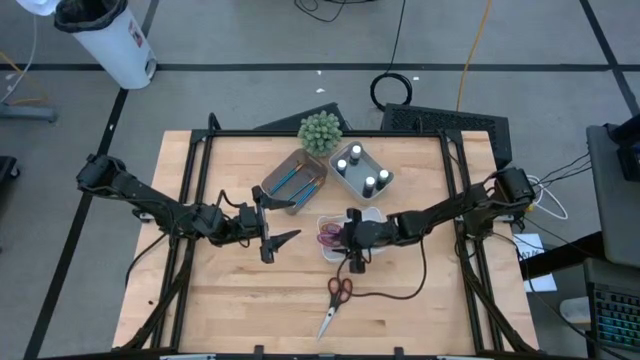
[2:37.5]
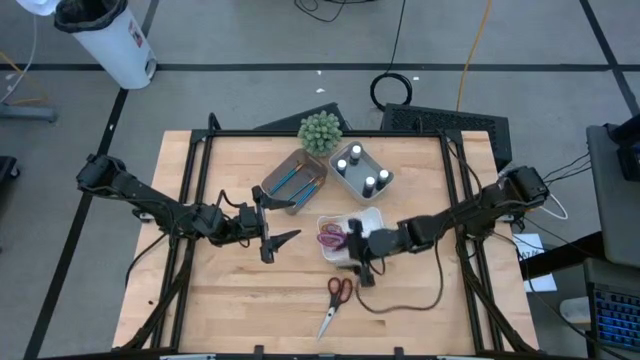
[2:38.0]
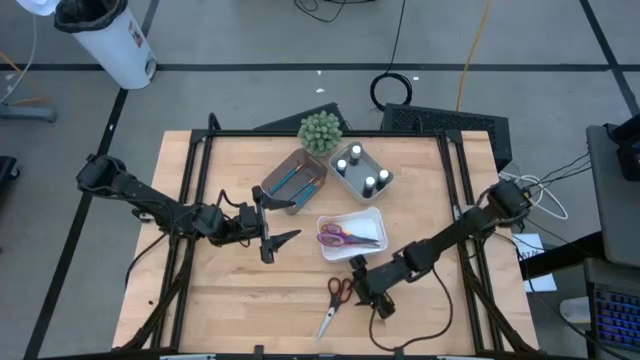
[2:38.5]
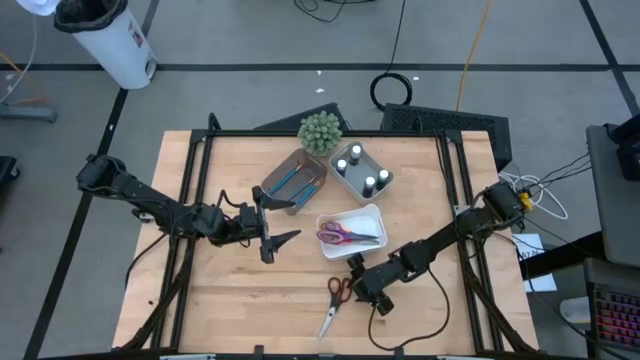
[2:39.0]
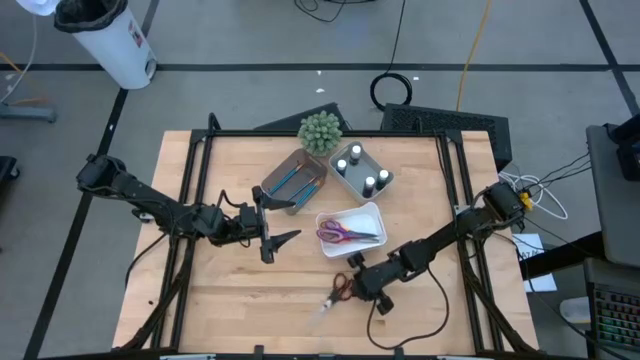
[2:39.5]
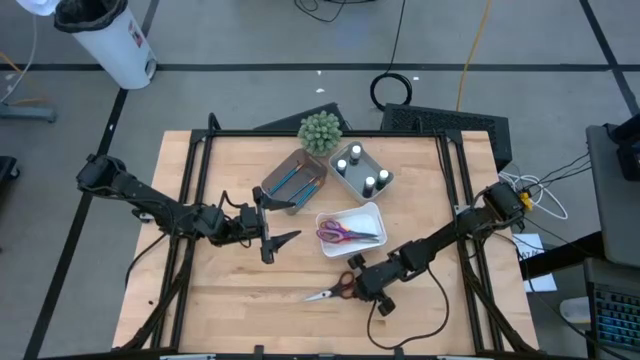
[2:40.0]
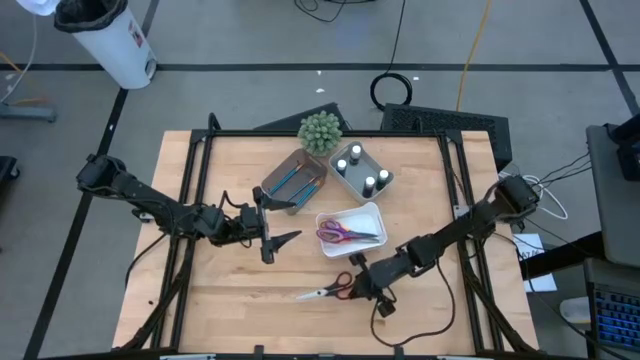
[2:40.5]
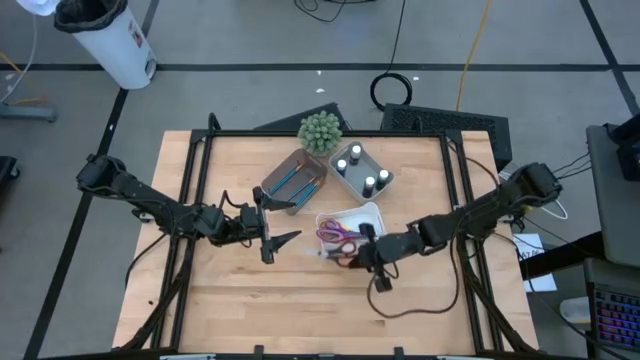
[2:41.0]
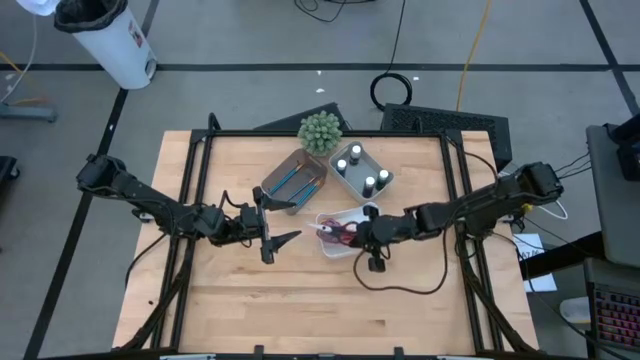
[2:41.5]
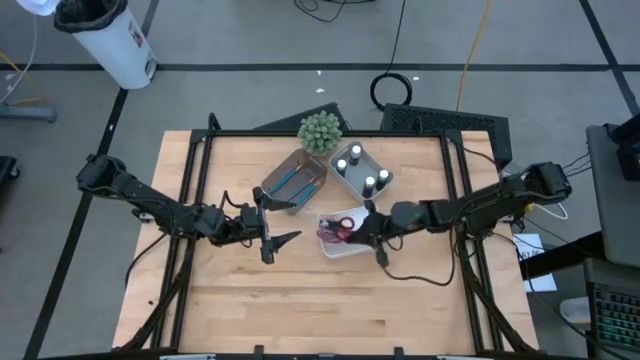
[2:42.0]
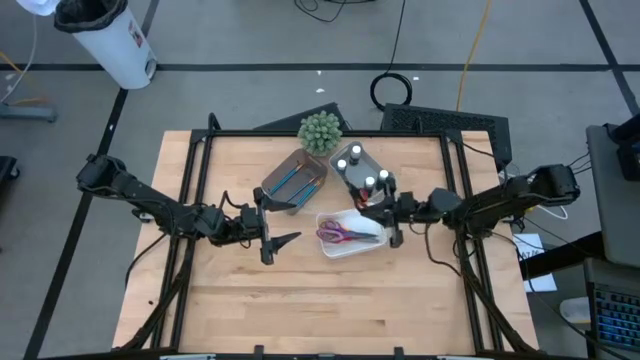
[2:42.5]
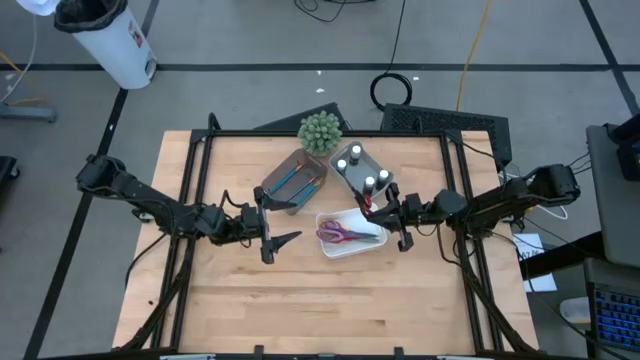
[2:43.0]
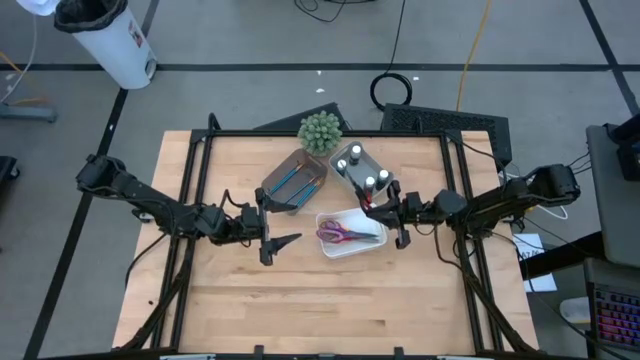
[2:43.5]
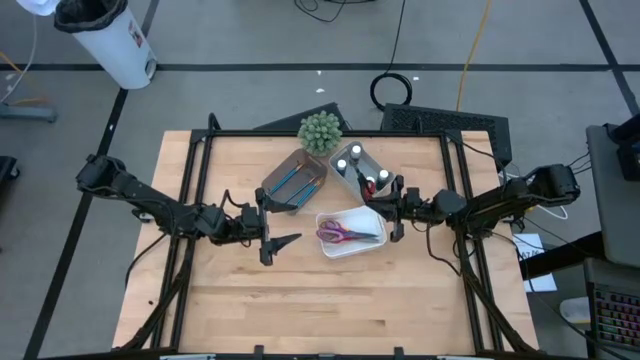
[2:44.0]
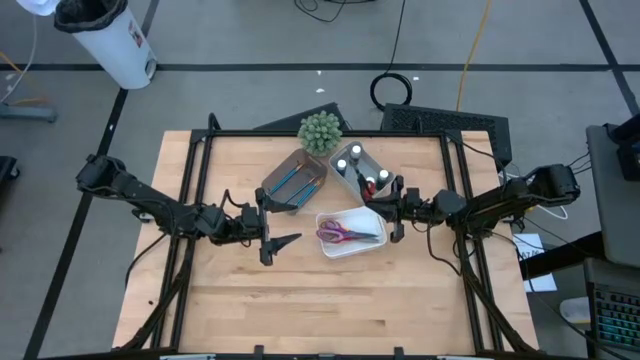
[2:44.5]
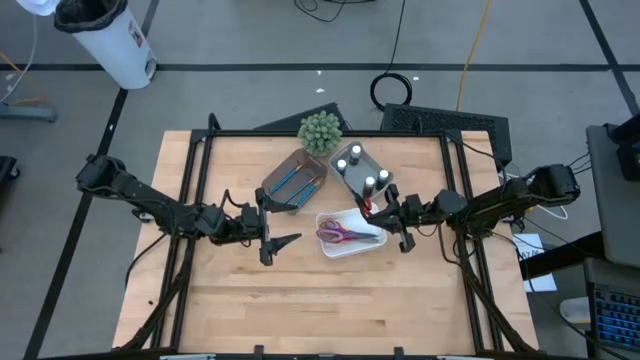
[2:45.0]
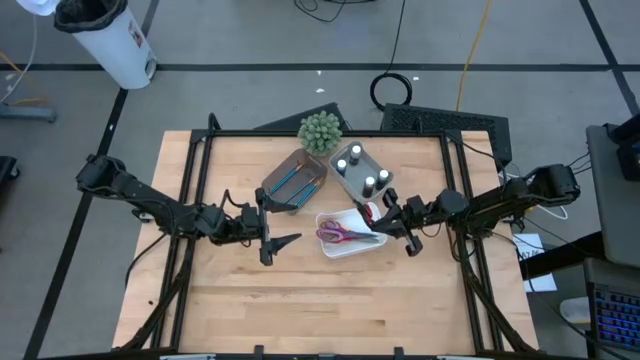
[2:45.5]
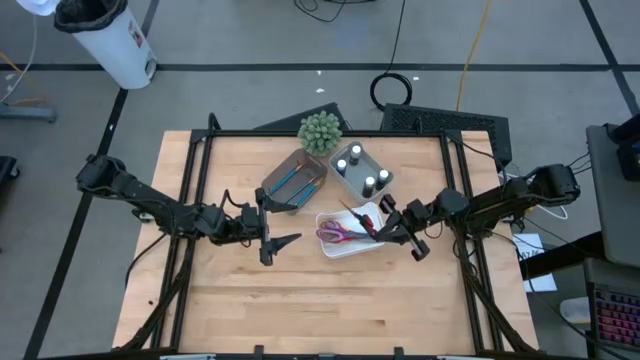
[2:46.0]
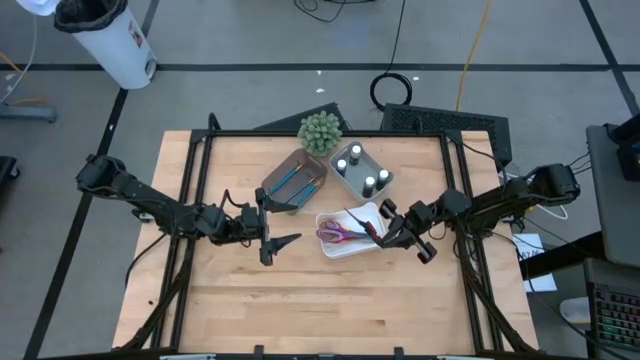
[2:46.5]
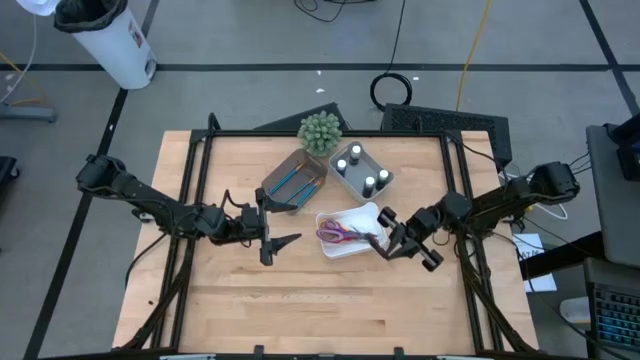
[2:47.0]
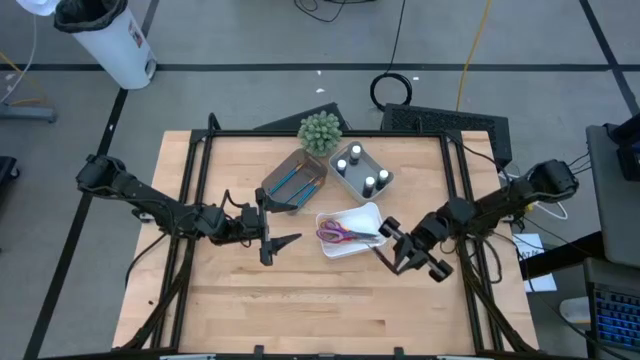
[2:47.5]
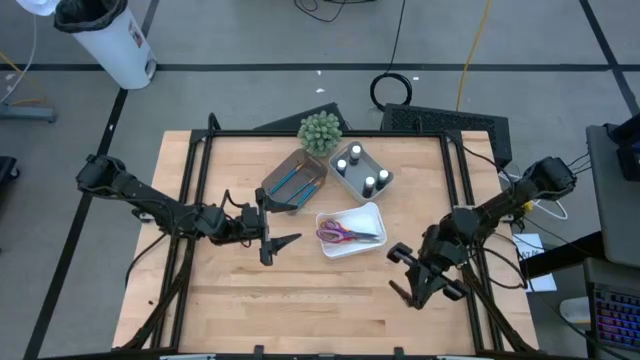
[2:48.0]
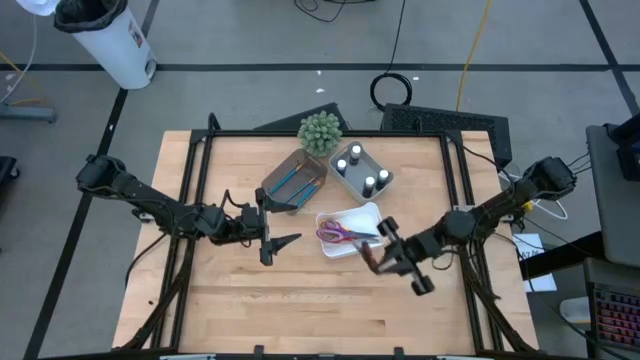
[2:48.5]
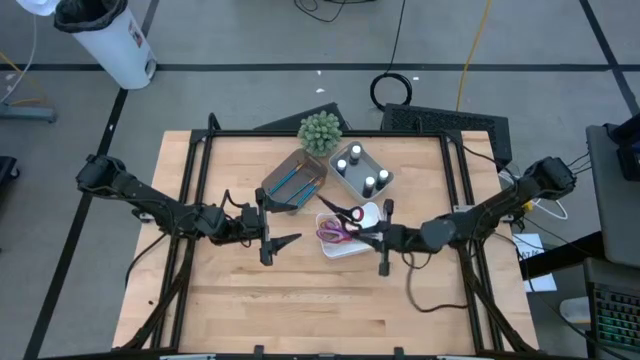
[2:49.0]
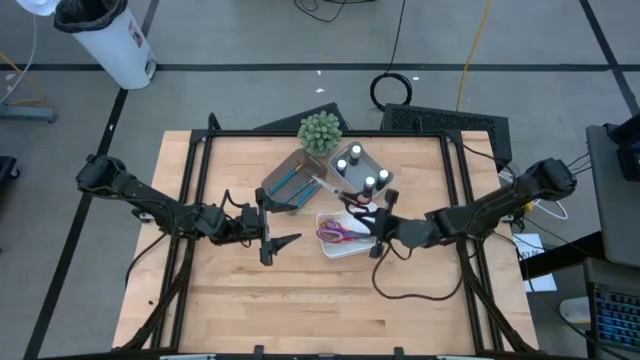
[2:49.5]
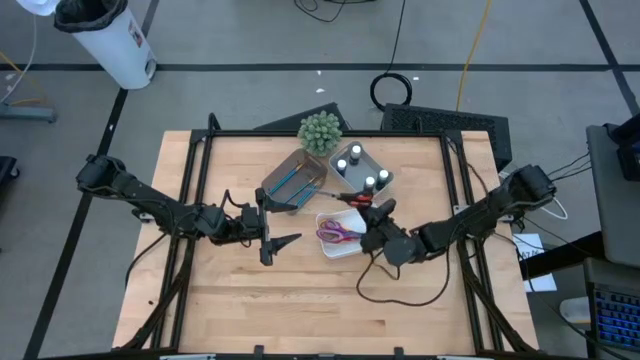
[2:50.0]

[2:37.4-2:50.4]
Task: Pick & Place Paint Supplies
Put the black scissors into the white bin

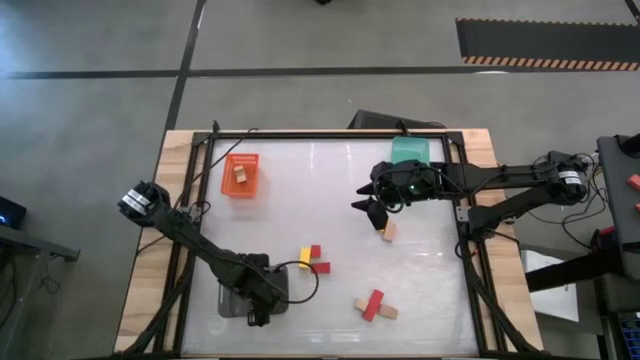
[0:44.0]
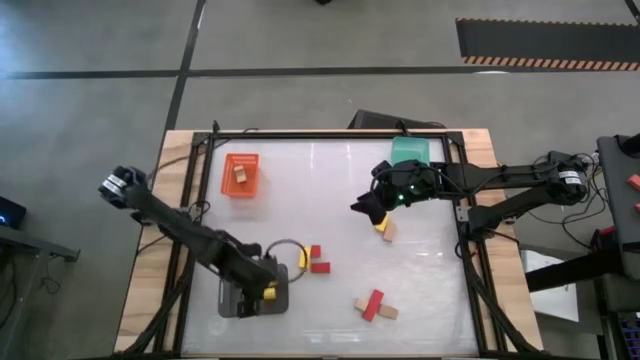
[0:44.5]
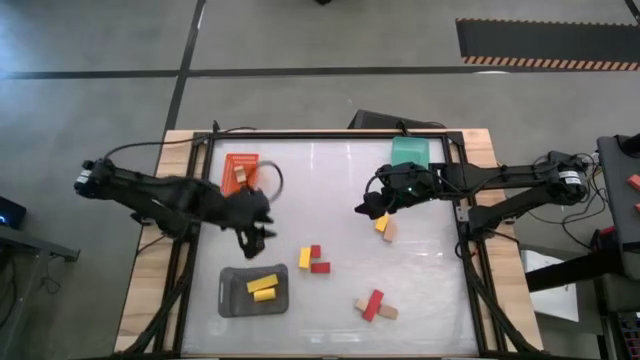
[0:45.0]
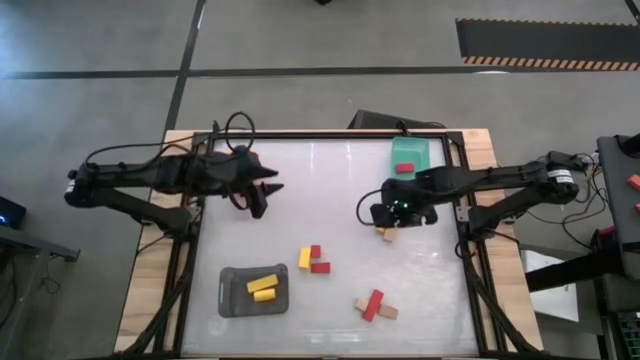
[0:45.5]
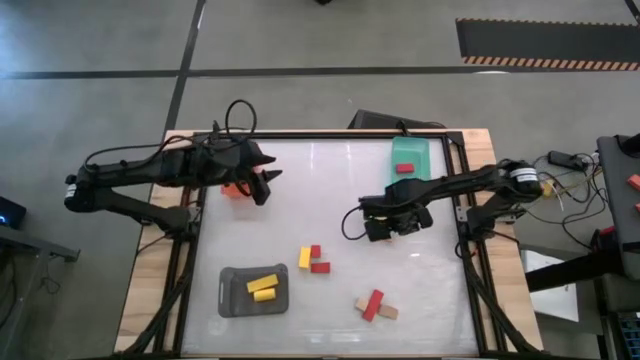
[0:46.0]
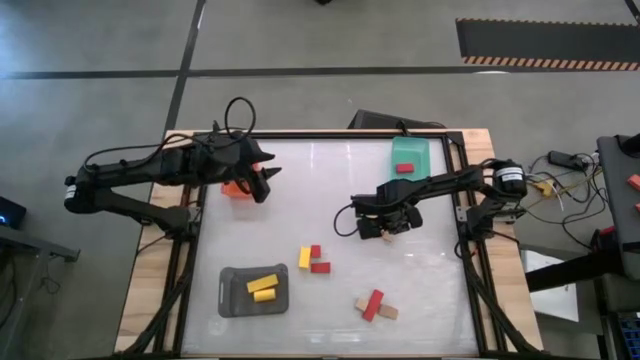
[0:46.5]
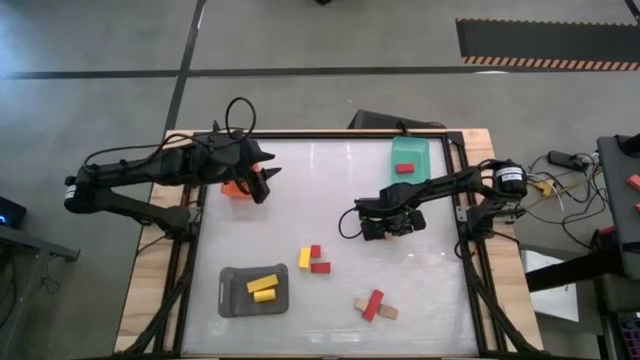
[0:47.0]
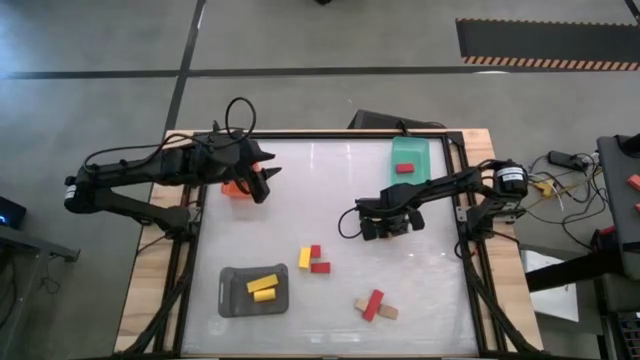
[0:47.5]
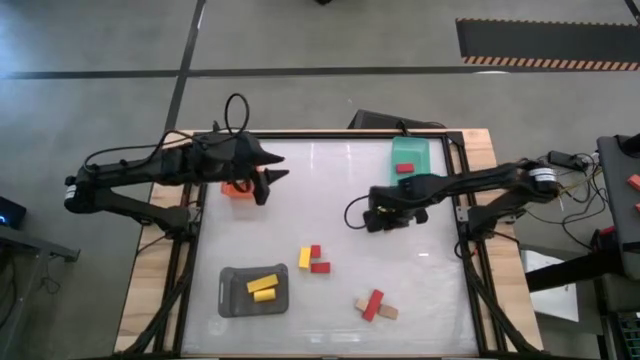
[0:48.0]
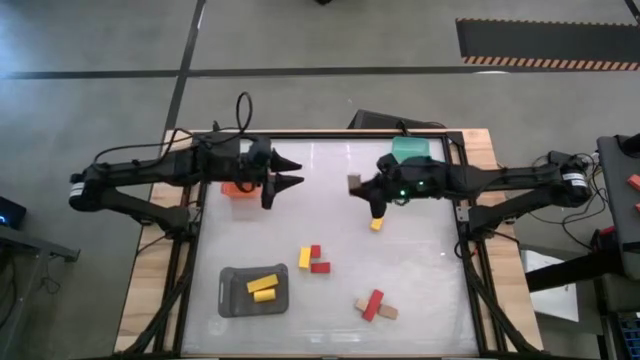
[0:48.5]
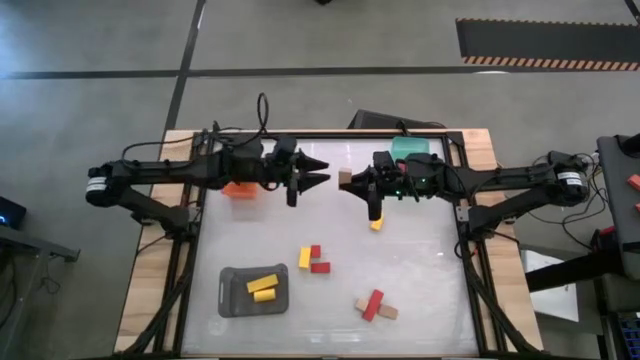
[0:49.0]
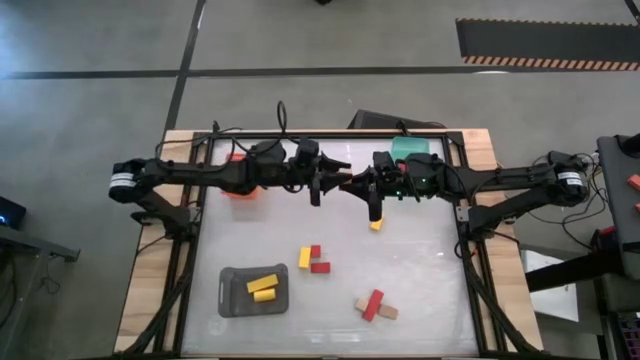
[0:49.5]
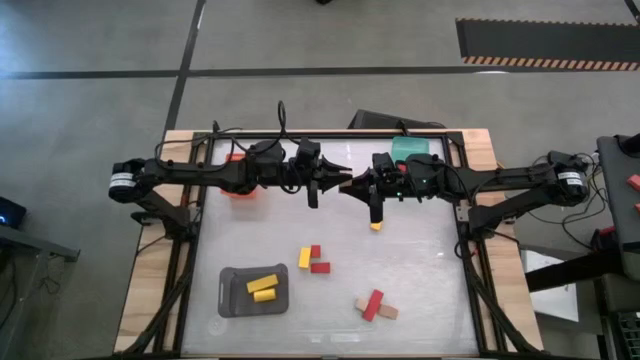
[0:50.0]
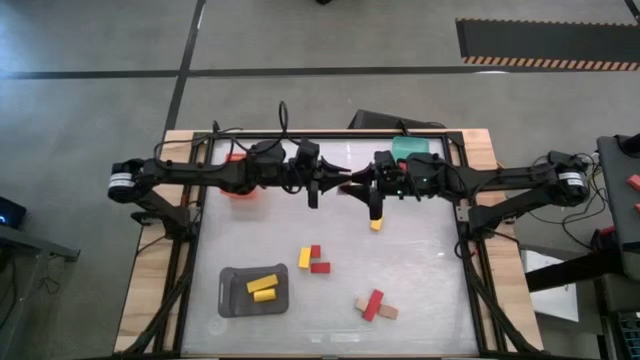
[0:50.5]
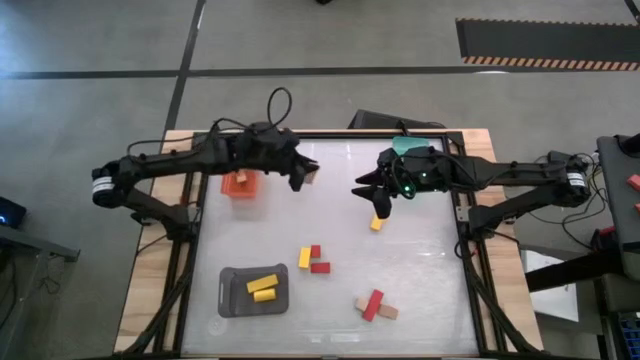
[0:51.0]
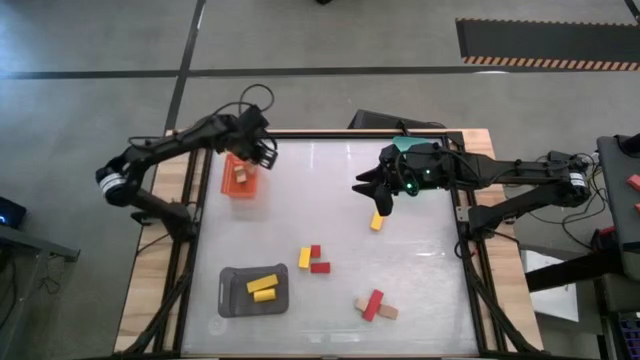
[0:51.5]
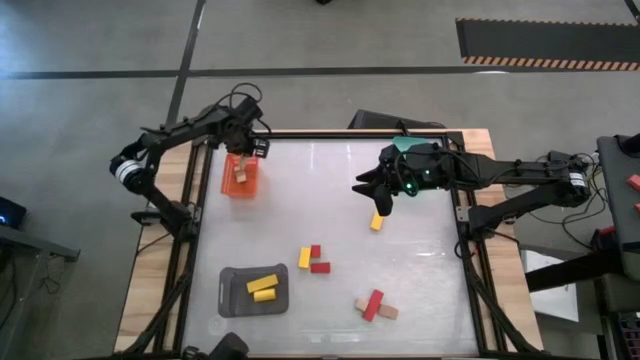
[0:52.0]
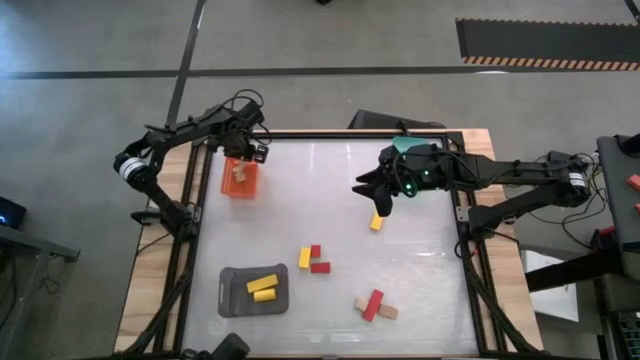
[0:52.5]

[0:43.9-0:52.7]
Task: Sort & place blocks by color
Put the brown block into the orange bin
